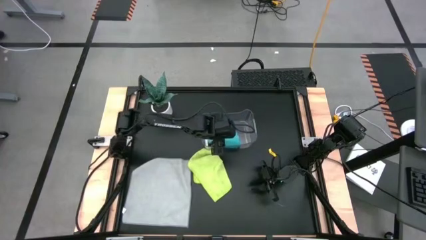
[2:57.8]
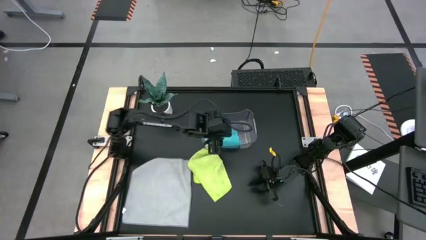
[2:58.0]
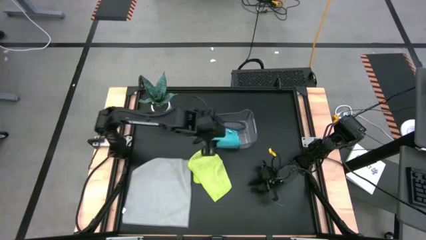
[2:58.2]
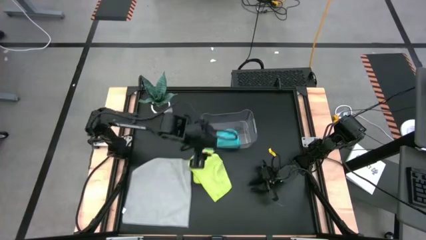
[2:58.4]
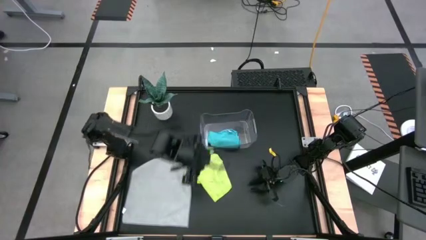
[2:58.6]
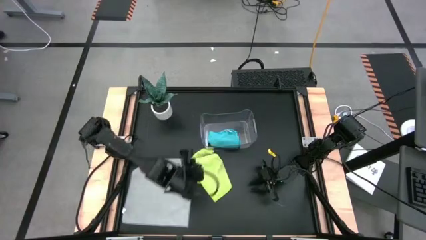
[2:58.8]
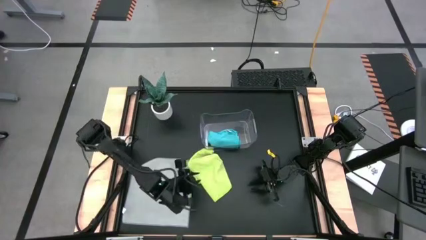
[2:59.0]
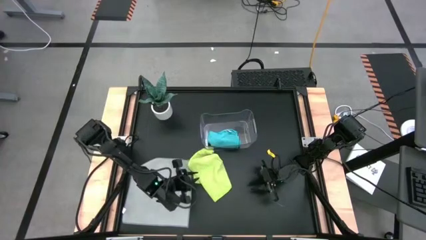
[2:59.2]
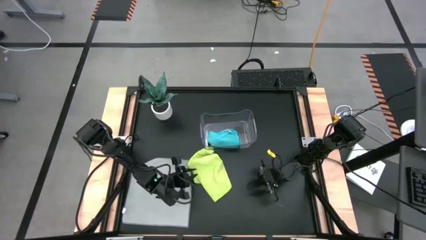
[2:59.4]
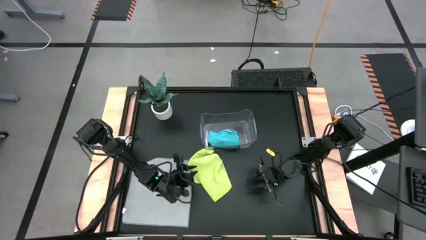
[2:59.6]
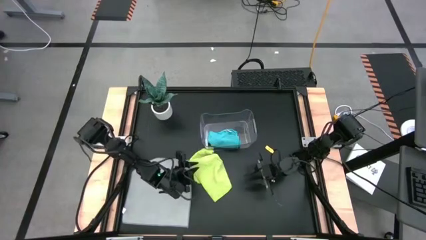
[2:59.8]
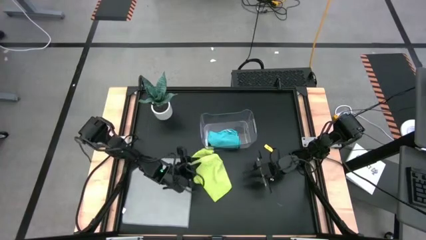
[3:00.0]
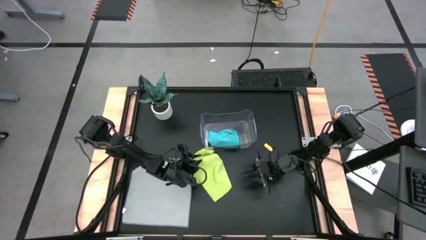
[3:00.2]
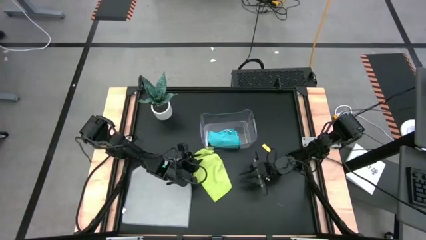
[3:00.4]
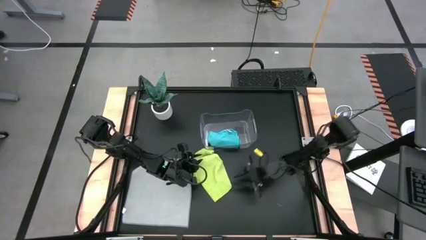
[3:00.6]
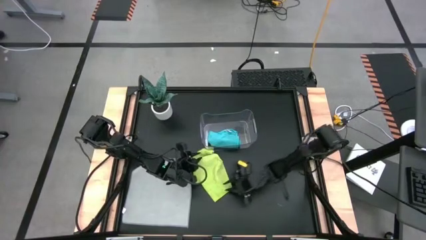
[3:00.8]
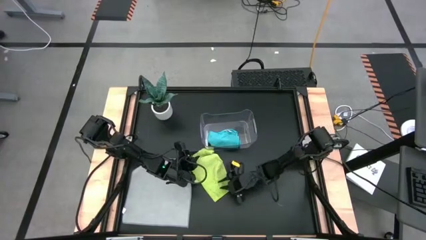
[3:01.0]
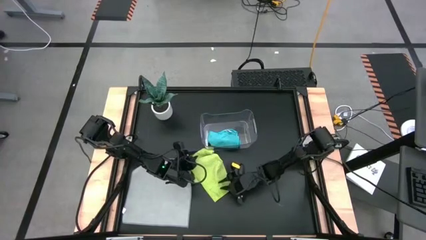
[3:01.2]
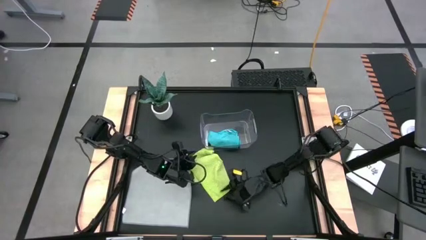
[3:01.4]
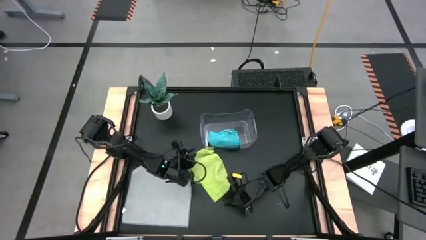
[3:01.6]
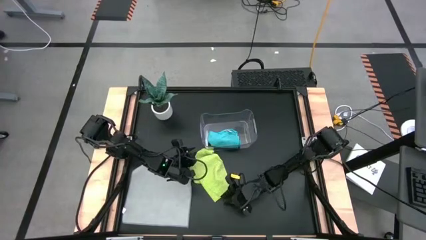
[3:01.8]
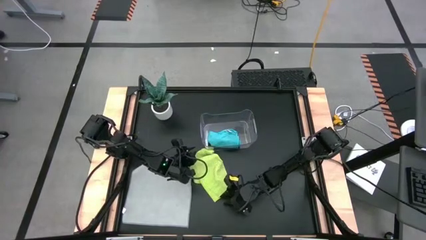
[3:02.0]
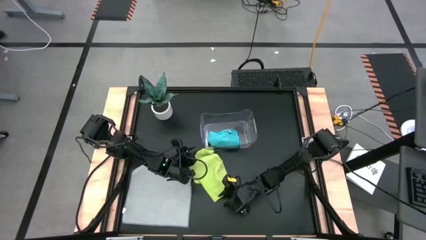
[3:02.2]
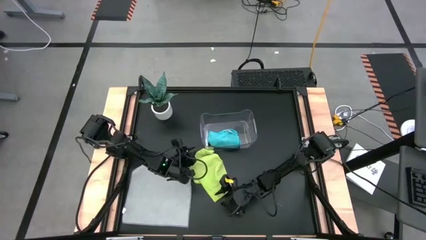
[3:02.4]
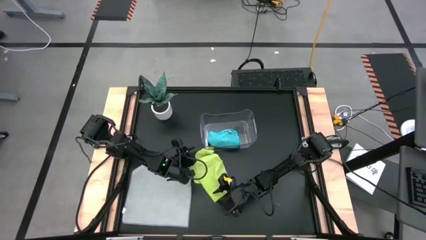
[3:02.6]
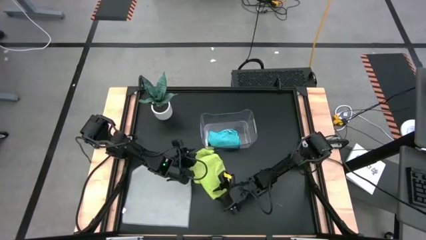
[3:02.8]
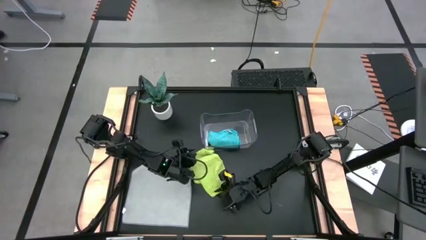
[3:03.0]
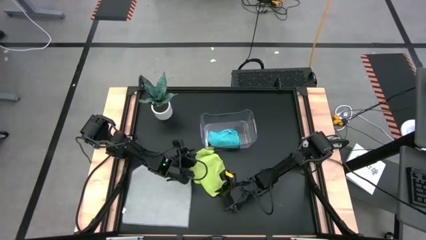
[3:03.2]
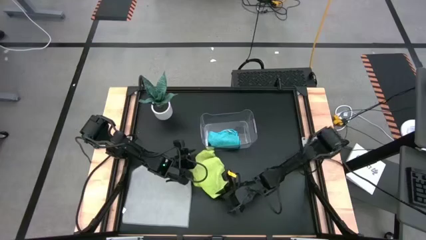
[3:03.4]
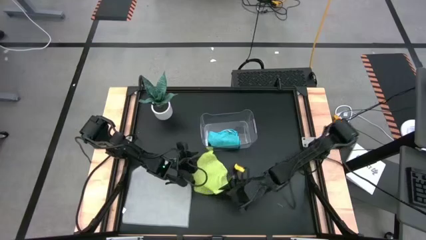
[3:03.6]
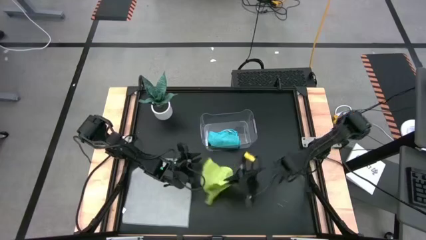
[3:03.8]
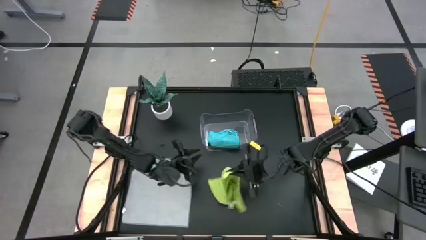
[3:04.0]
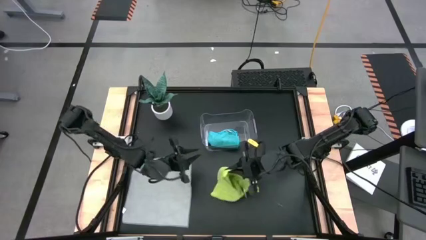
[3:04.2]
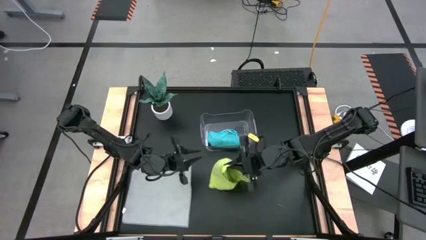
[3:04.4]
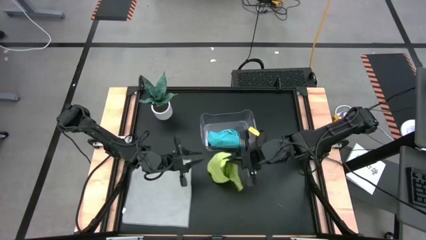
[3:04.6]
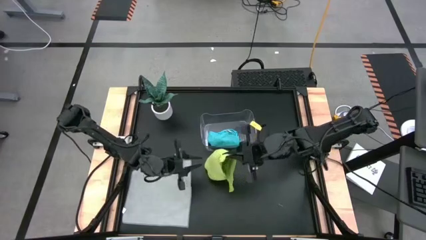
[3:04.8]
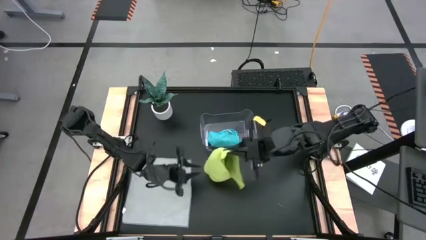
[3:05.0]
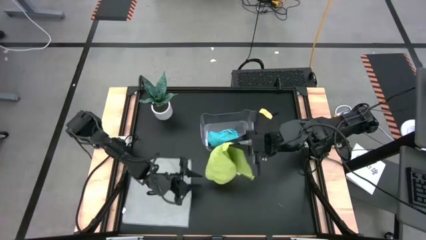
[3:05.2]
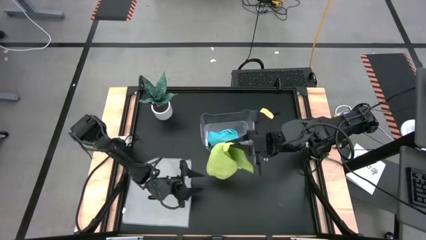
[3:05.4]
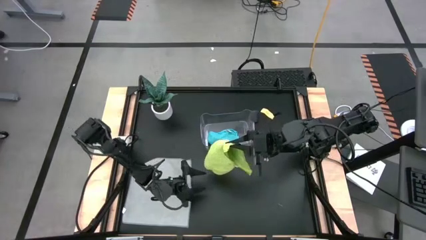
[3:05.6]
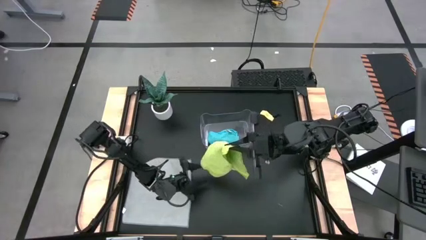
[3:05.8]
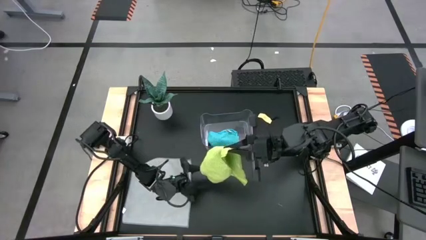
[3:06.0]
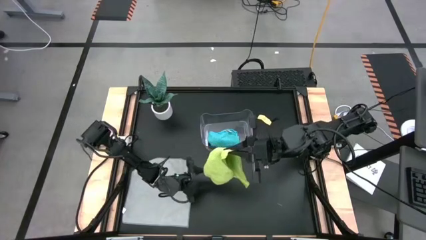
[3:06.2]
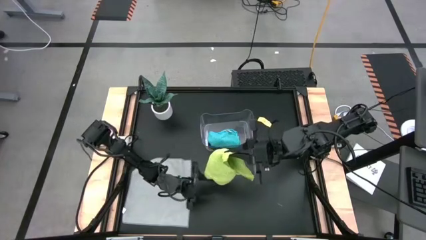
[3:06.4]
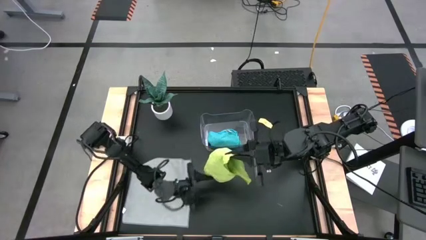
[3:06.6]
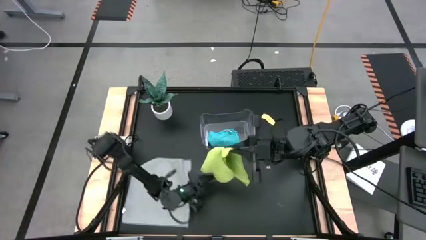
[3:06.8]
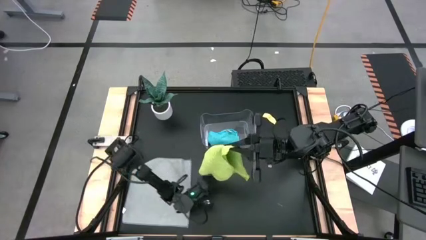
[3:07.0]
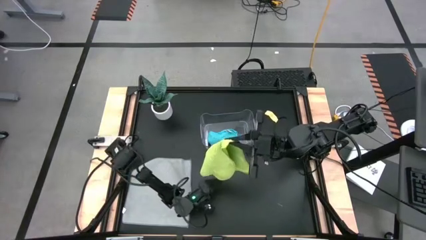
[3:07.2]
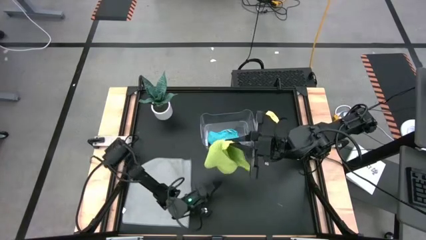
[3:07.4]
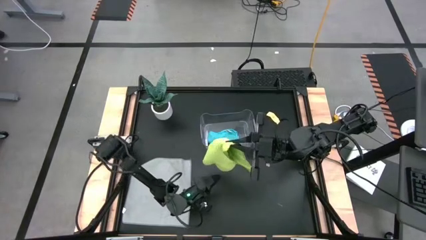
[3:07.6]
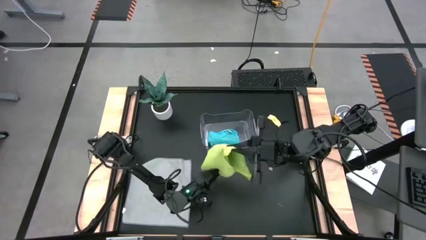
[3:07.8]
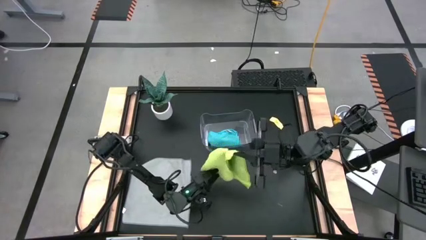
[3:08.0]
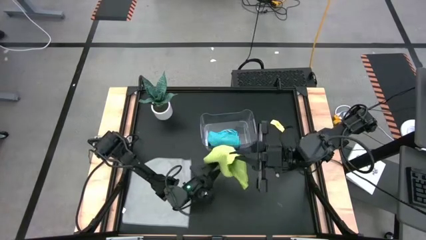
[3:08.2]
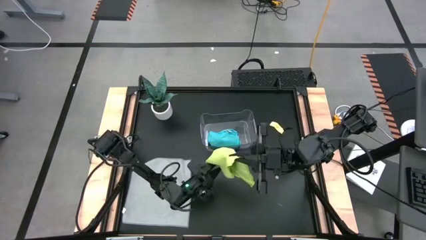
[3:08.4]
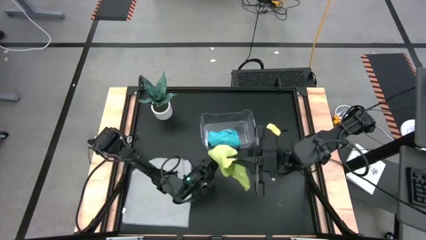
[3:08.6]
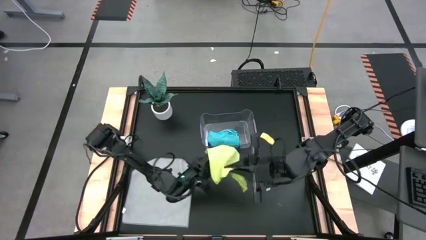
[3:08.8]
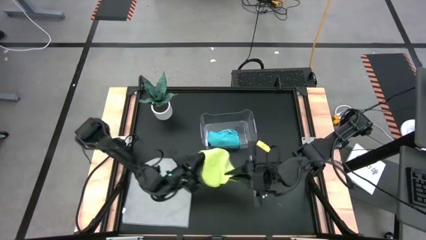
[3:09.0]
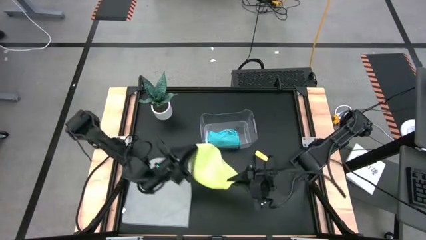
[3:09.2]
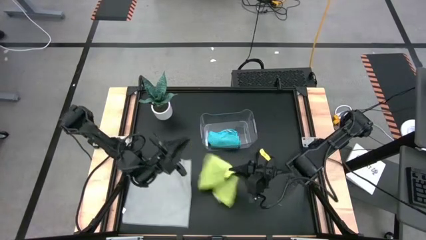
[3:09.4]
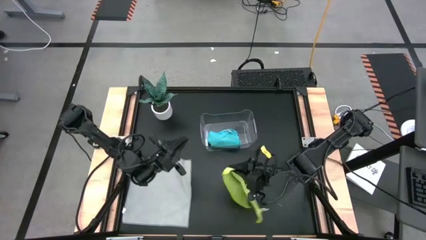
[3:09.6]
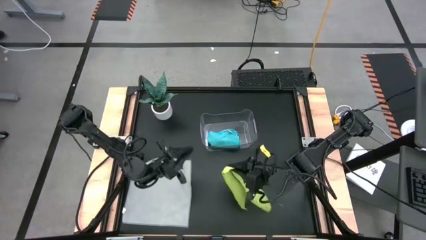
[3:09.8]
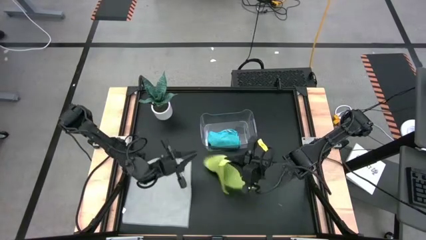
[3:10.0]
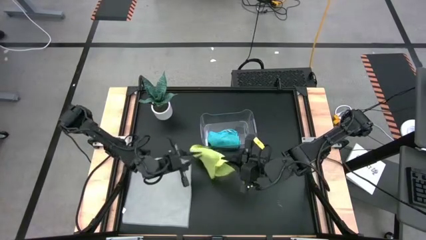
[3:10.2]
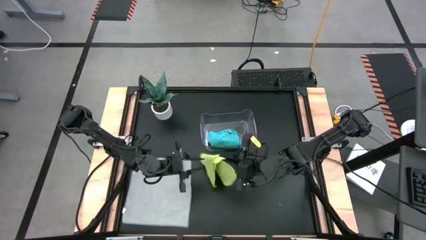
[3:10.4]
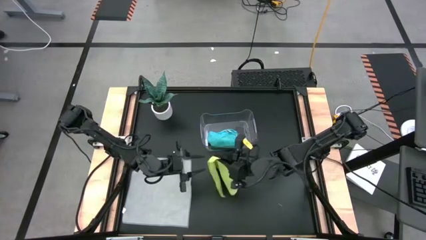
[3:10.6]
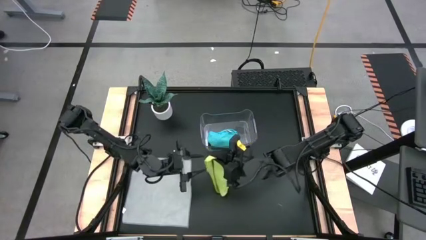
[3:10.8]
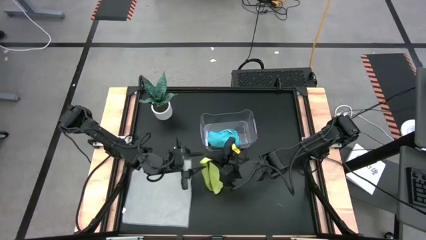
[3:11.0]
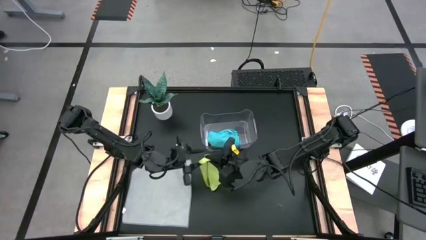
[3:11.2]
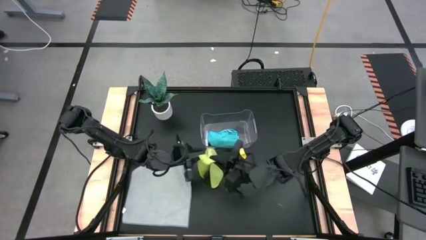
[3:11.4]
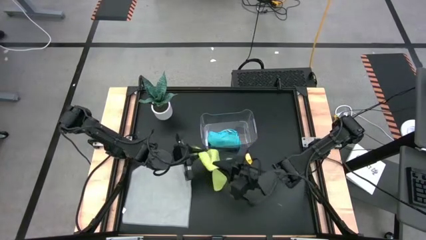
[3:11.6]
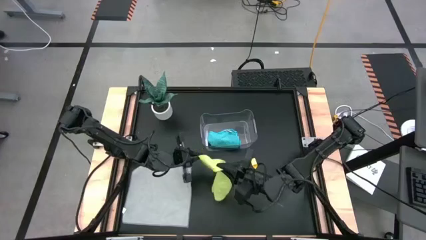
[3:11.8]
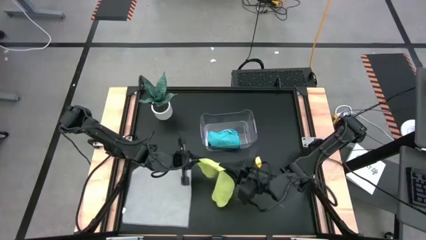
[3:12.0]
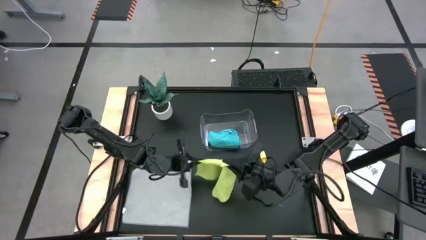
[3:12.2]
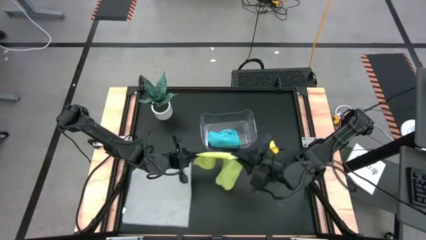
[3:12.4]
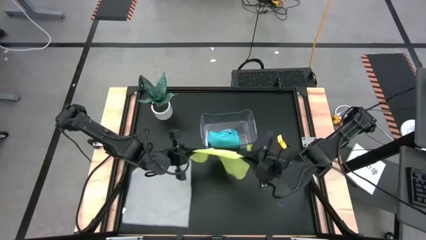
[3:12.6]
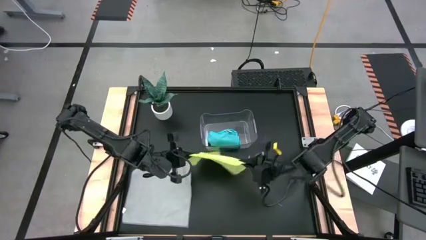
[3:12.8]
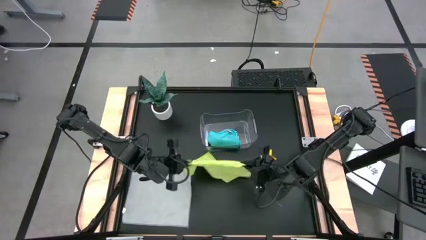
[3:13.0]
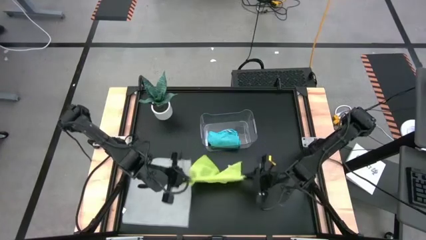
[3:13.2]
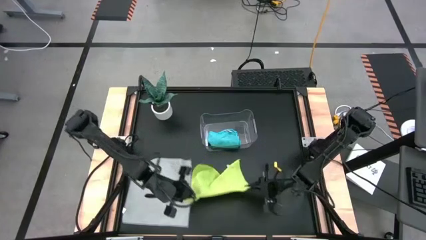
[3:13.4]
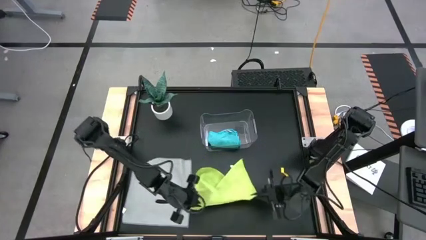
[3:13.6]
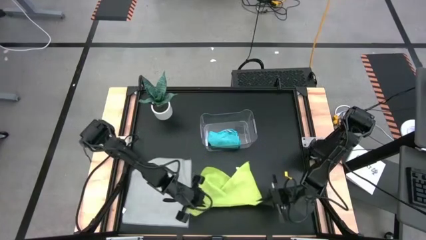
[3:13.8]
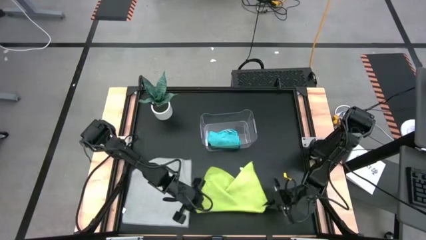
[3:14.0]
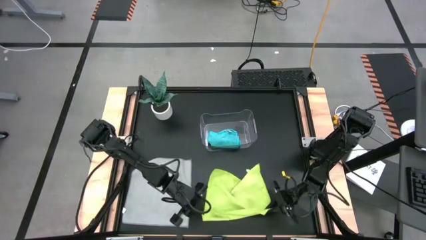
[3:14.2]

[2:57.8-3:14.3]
Task: Fold microfiber towels
Fold the green towel
